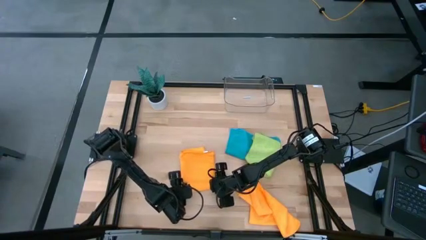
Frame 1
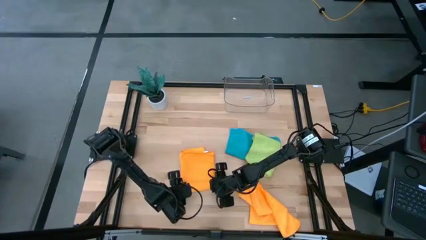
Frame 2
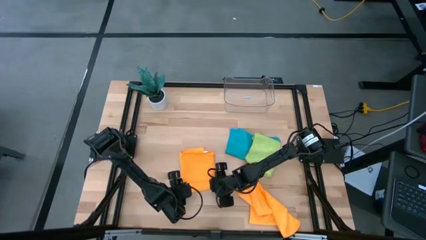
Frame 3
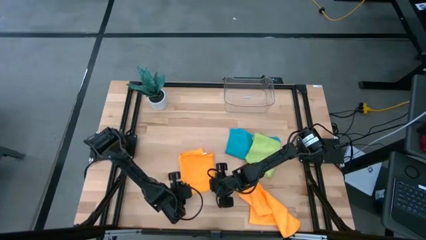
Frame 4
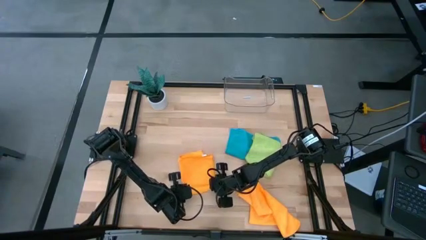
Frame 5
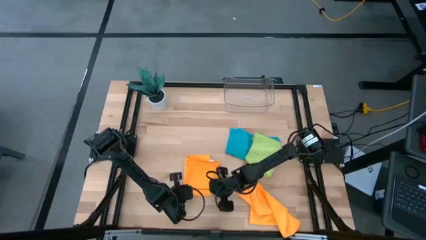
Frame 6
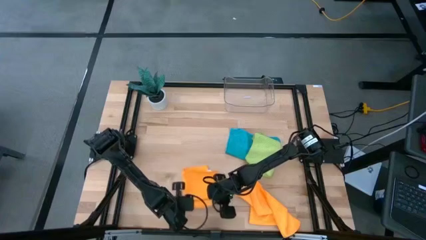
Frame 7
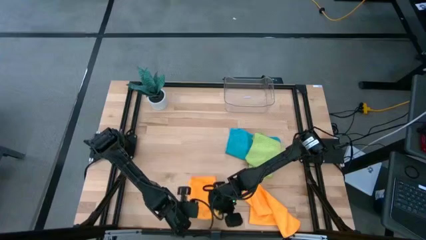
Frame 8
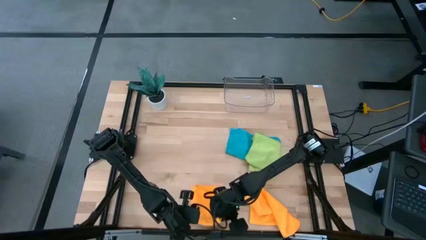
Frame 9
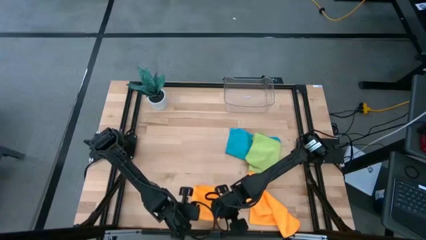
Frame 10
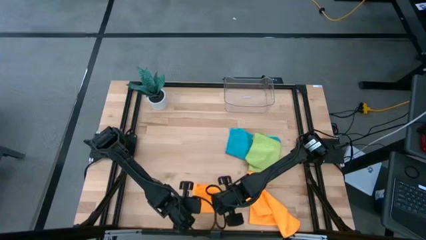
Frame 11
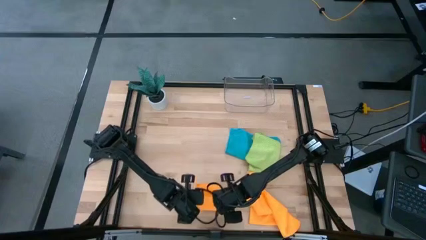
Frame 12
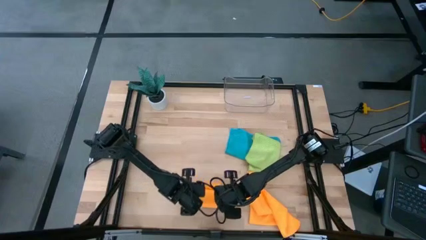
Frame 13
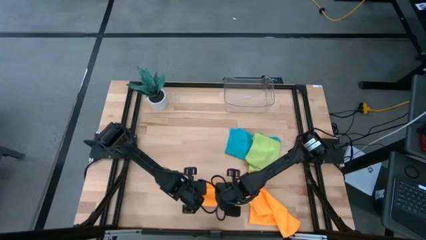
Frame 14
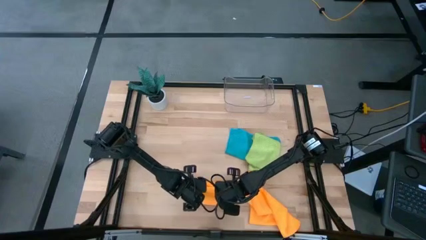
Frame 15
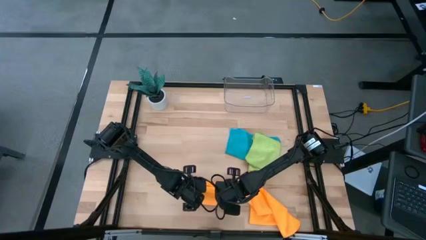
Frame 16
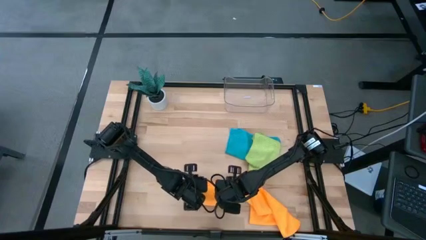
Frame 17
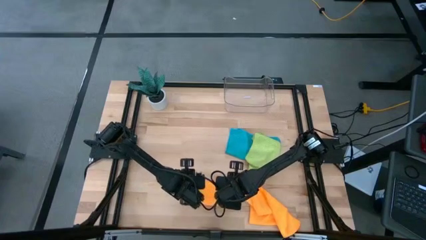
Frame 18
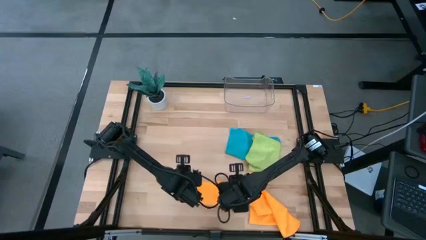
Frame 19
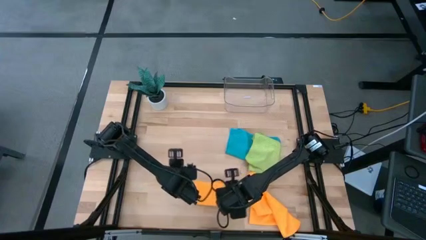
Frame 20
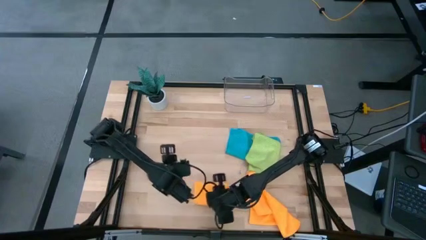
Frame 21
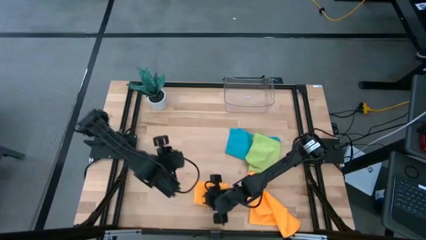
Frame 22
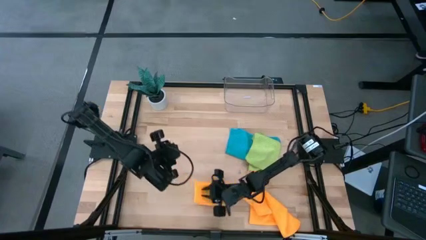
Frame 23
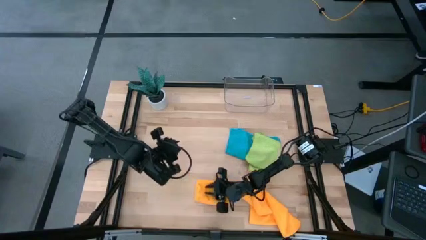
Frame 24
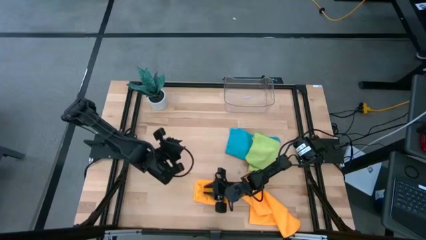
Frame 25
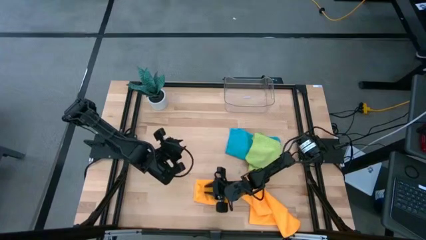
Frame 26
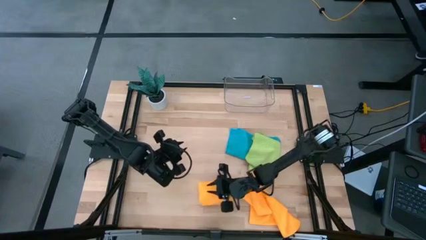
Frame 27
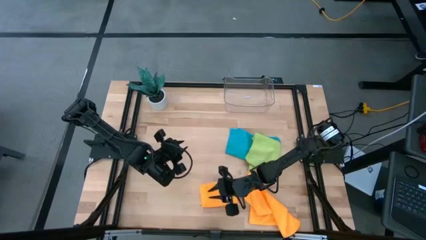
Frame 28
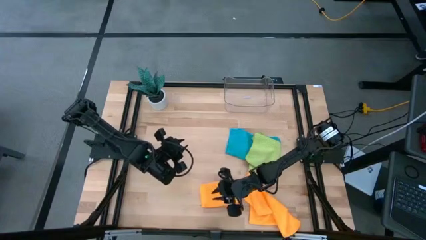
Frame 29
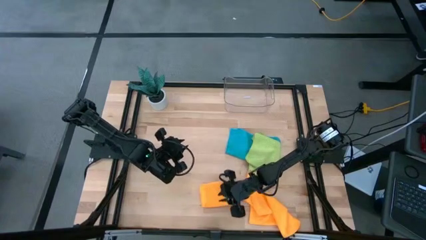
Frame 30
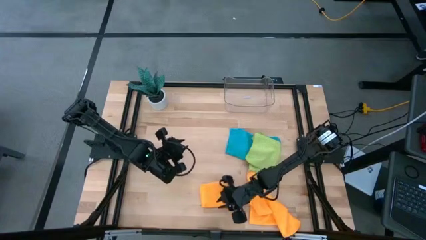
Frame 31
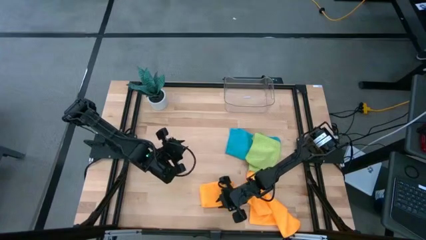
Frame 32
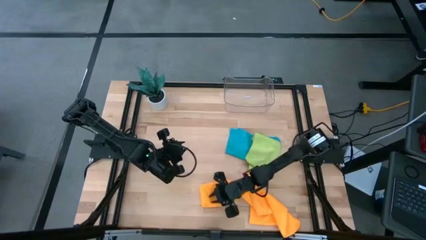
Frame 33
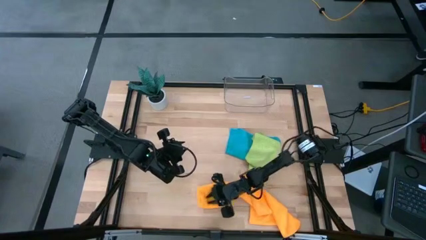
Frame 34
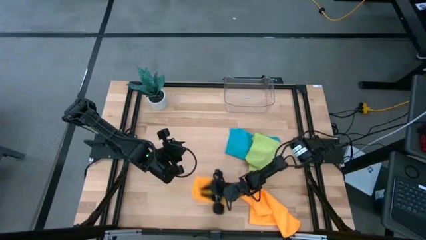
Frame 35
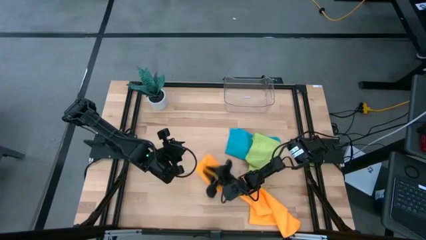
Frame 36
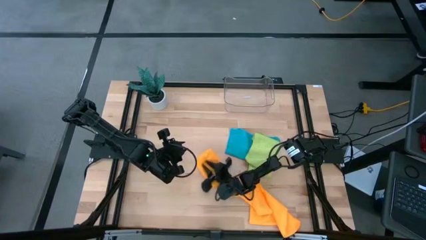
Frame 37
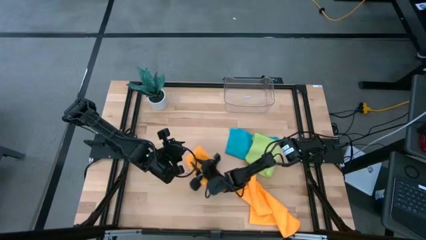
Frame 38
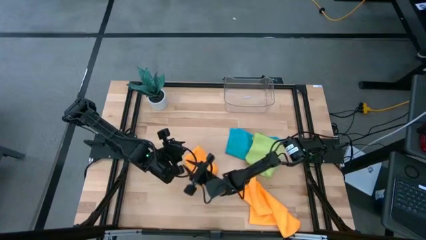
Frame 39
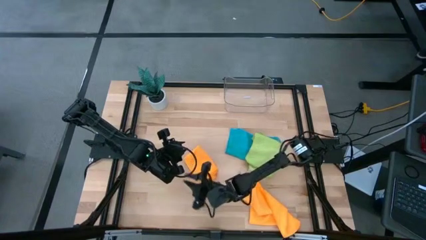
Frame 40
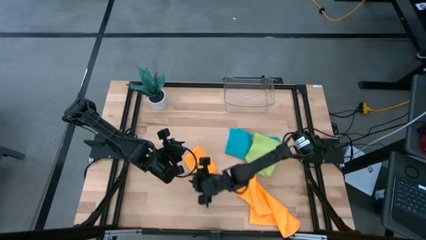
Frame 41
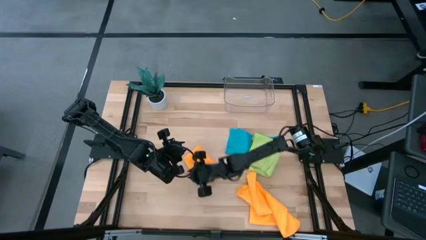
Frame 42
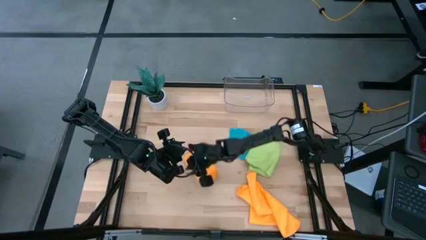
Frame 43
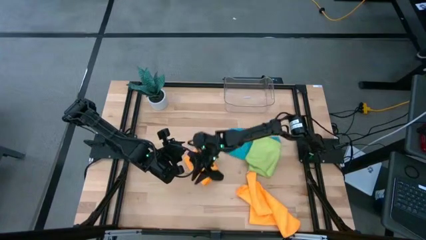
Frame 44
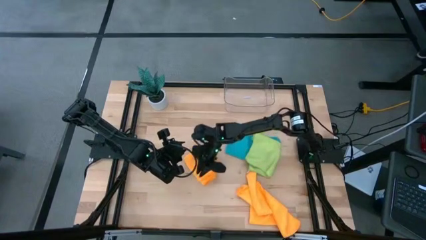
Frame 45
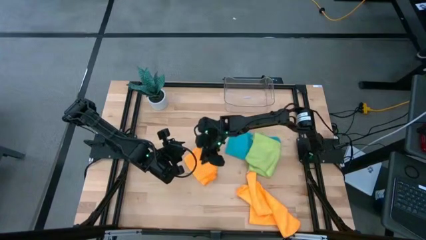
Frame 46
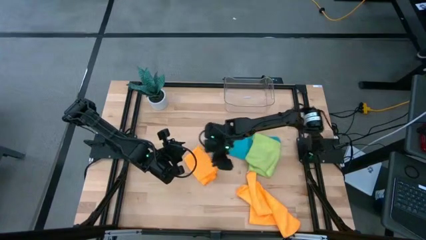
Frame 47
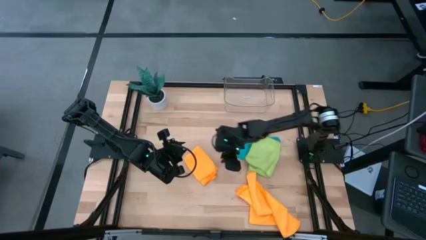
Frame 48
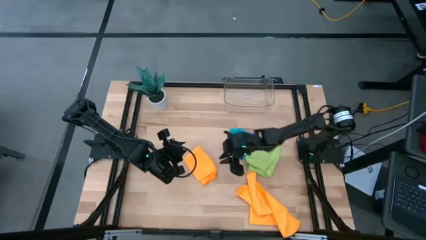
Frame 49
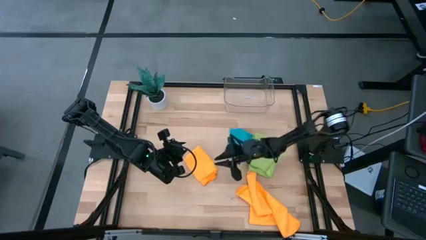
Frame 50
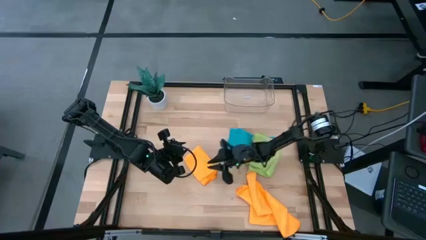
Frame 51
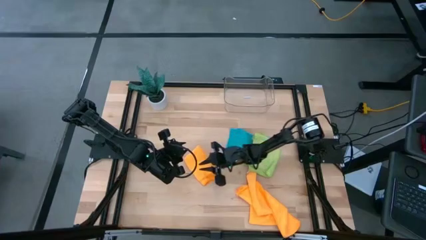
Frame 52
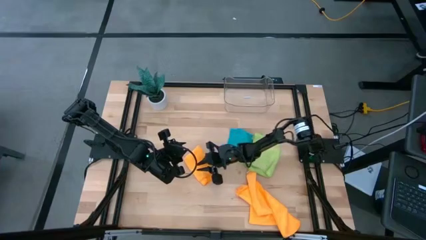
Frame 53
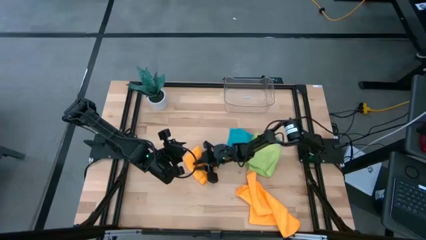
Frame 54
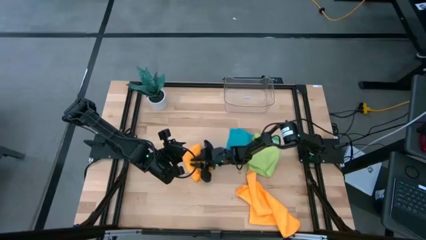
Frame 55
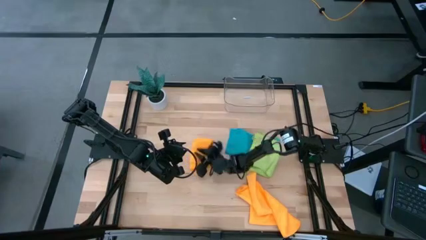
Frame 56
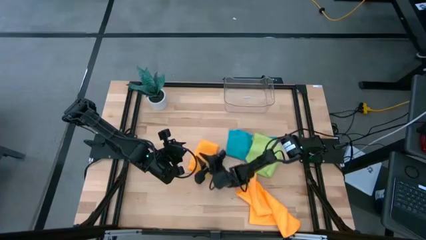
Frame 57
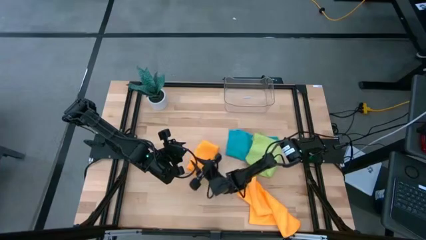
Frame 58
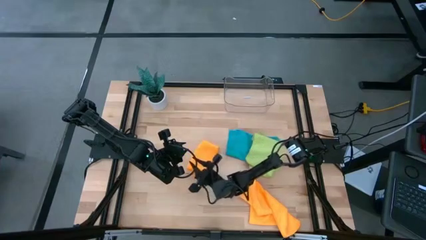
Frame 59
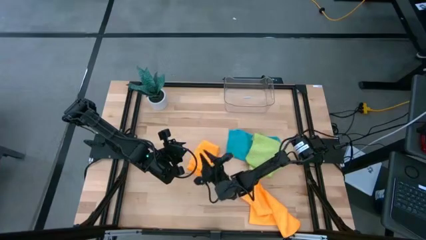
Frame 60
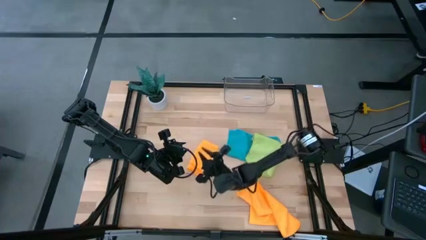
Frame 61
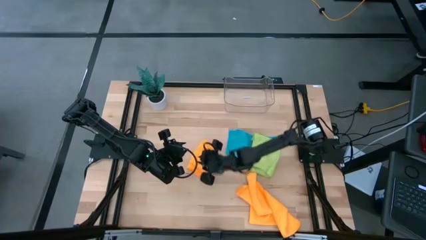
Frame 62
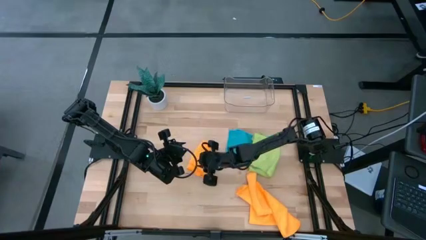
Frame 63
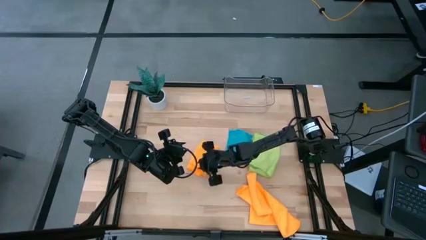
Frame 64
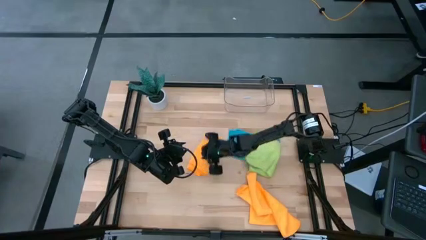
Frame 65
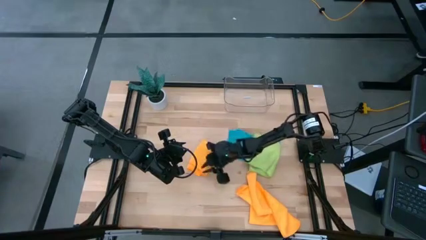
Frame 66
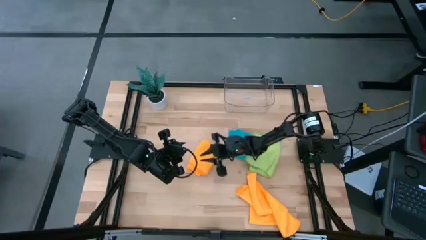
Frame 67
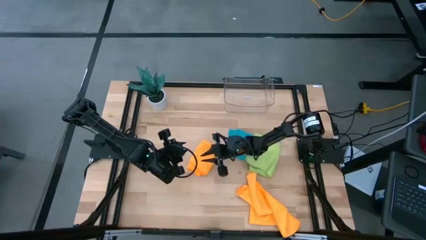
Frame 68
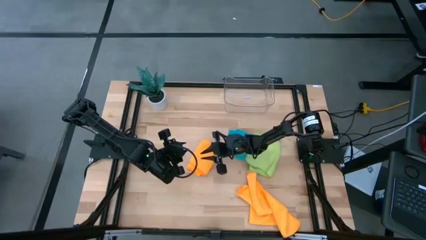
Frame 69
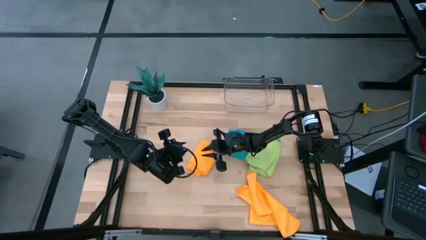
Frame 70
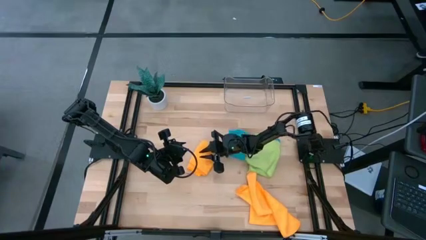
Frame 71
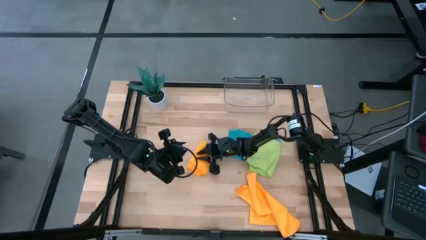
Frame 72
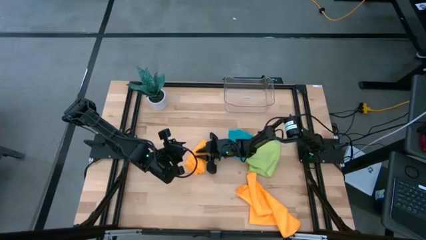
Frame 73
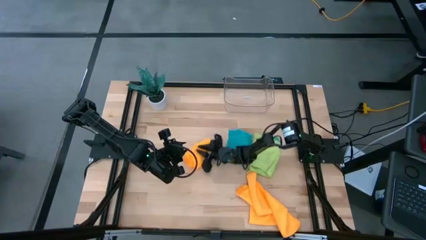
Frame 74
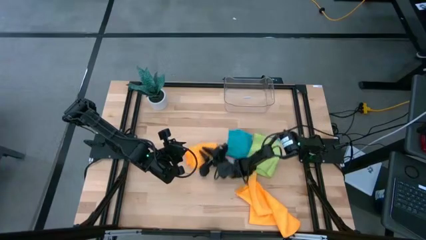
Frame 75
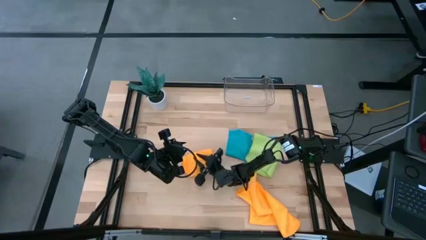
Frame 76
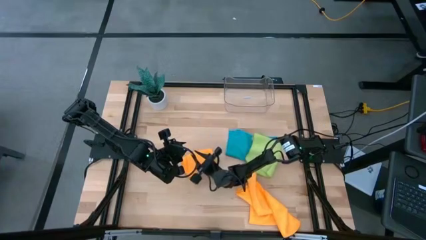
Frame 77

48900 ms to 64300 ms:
Task: Fold microfiber towels
Fold the top orange microfiber towel
